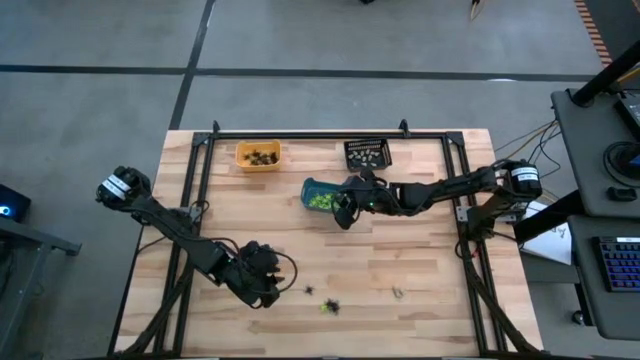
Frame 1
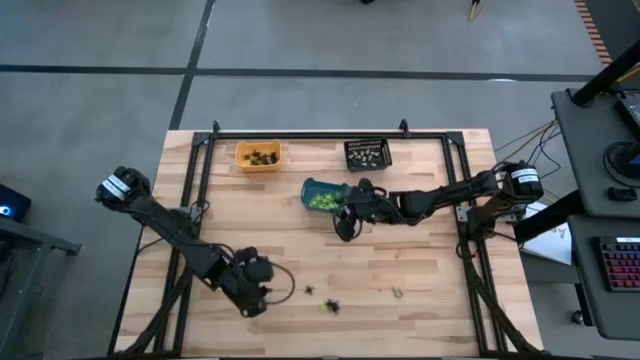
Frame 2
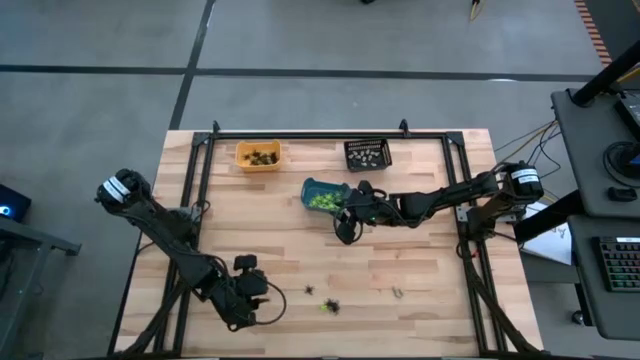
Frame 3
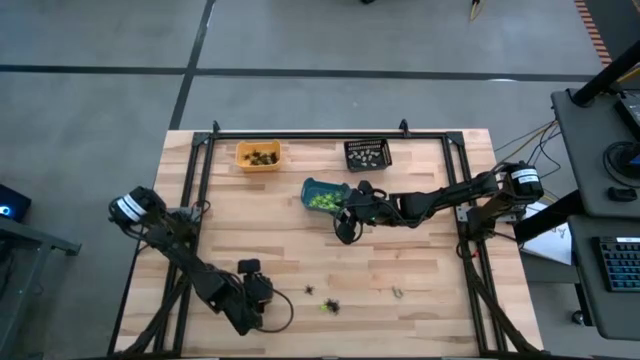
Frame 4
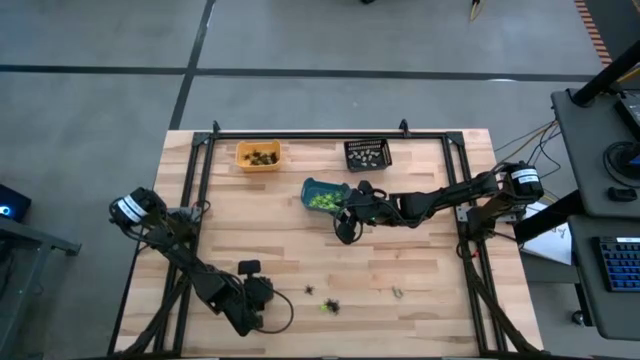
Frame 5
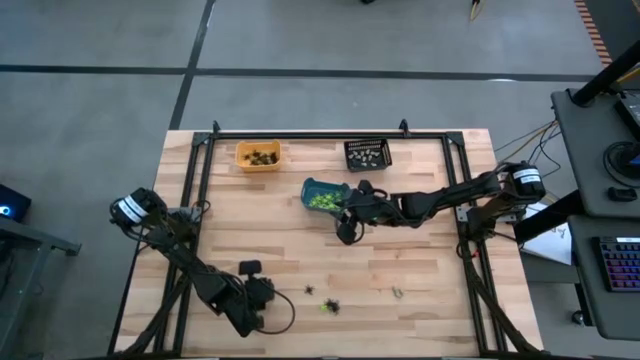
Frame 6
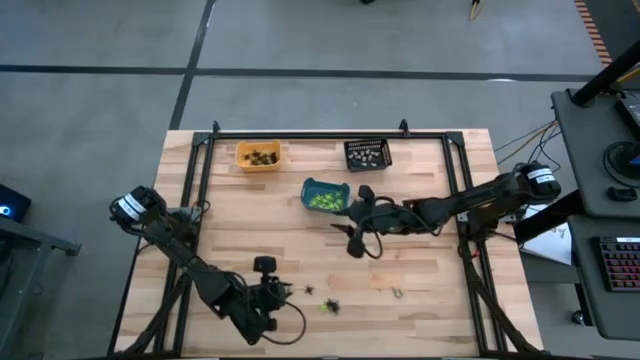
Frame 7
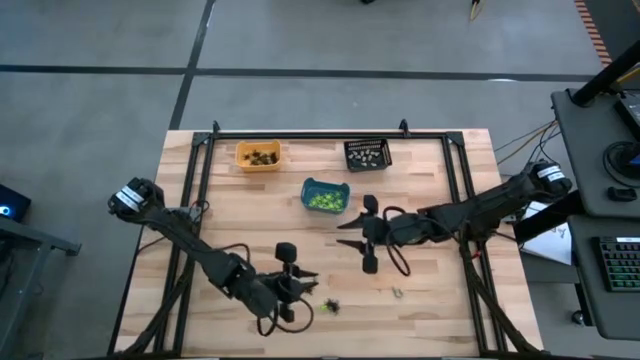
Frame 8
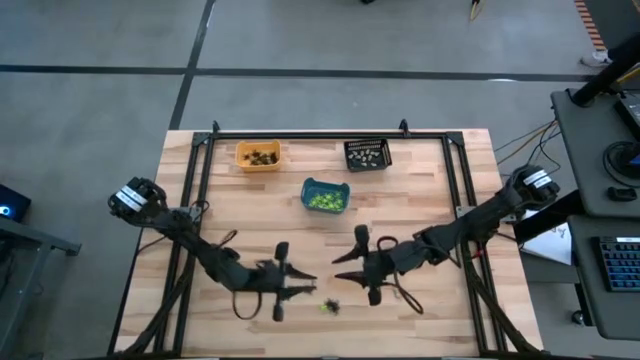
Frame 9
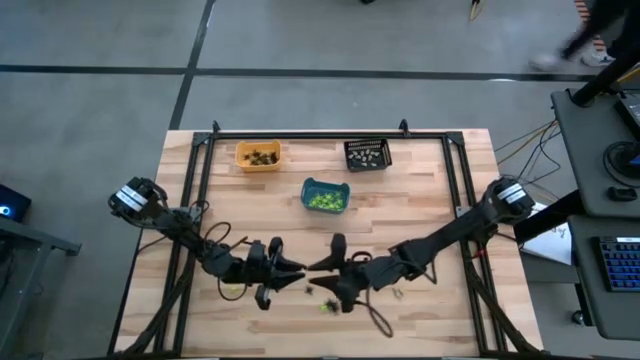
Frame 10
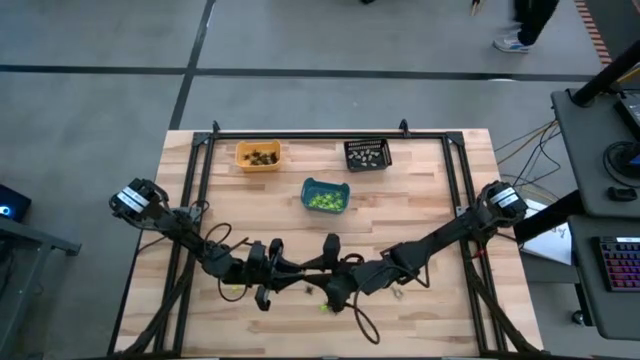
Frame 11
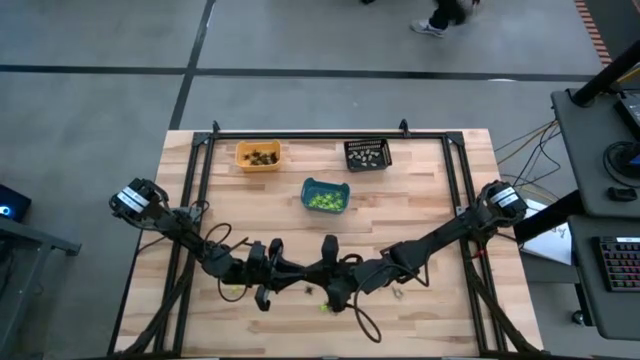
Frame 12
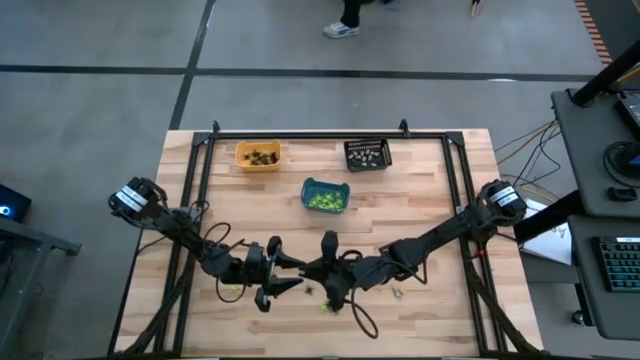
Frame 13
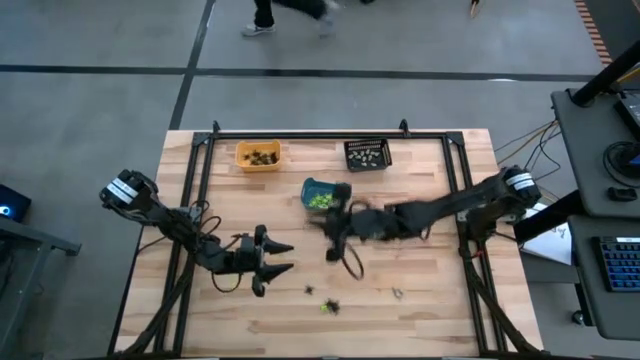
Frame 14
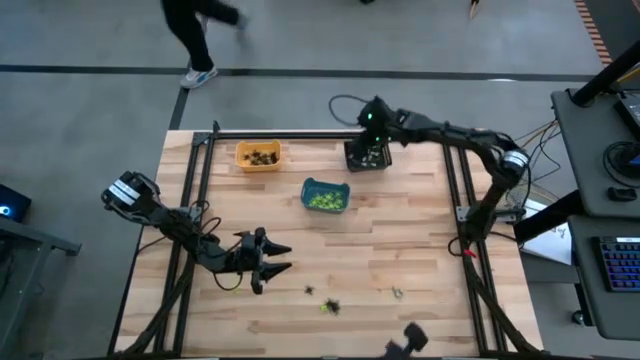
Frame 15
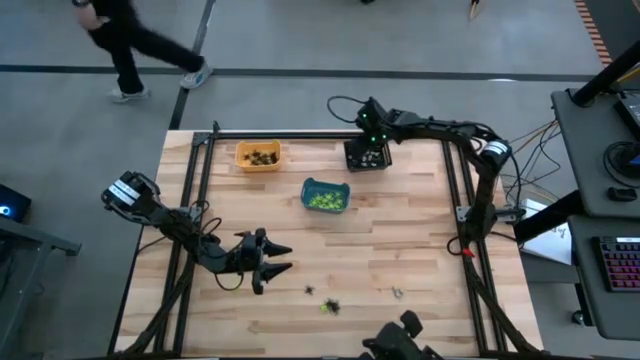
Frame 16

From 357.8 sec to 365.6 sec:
Task: Sort Halloween decoration
Put the white skull toy into the black bin

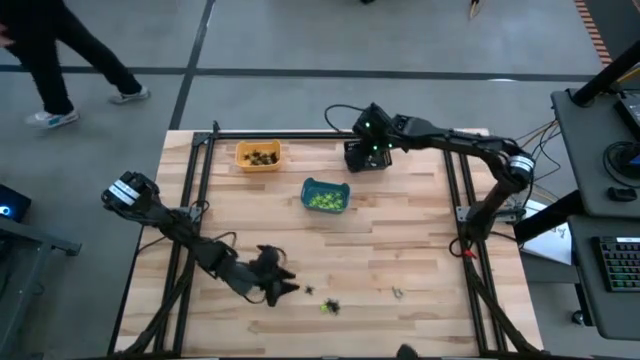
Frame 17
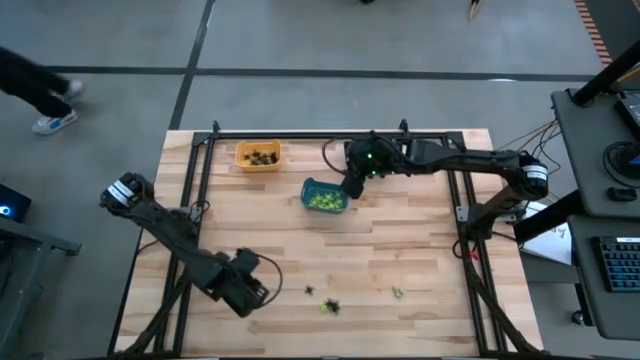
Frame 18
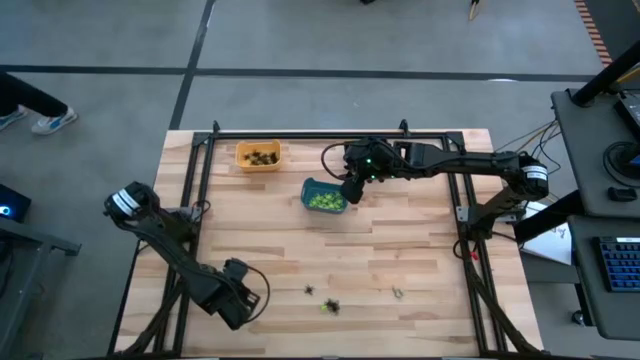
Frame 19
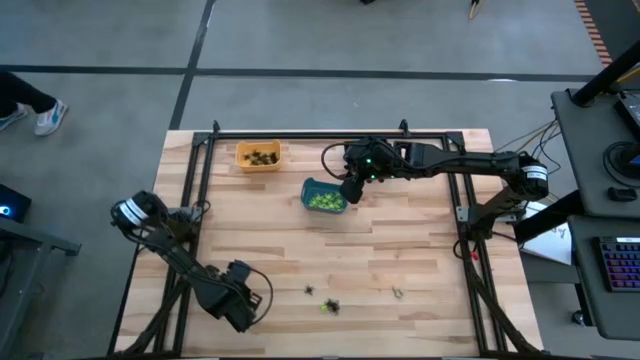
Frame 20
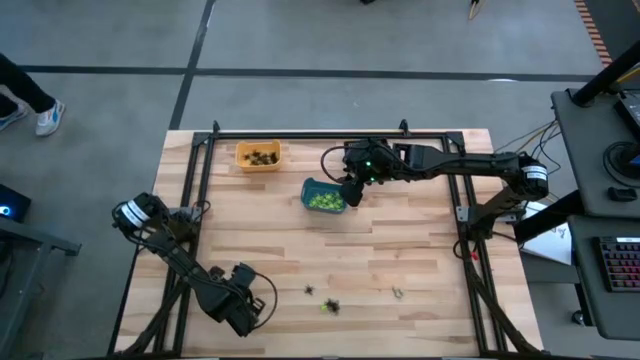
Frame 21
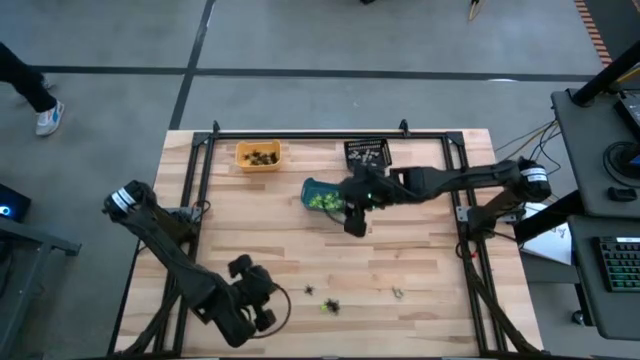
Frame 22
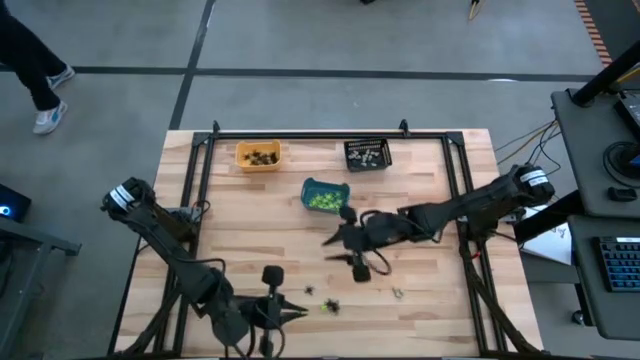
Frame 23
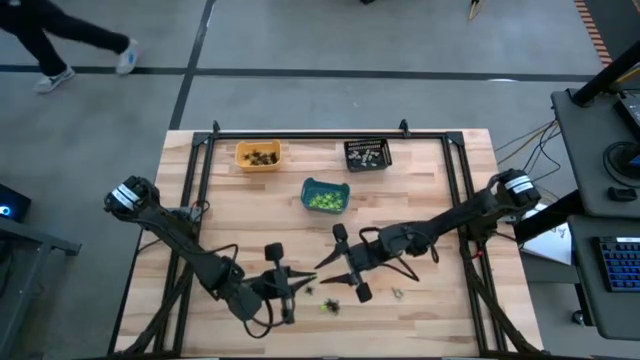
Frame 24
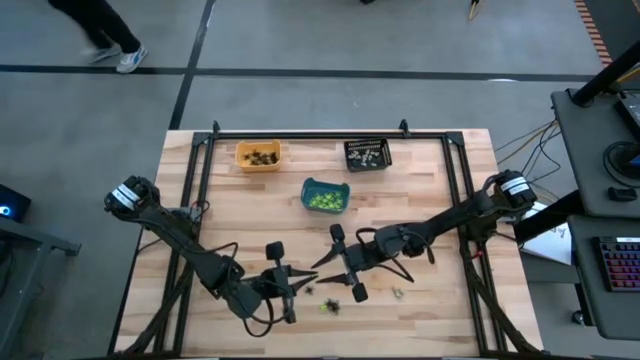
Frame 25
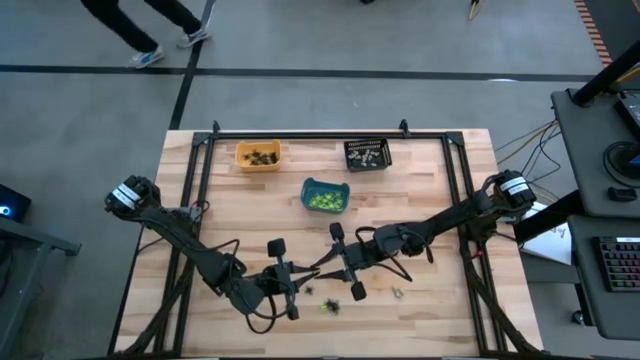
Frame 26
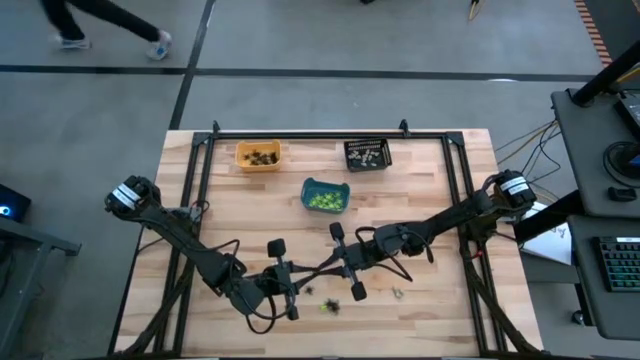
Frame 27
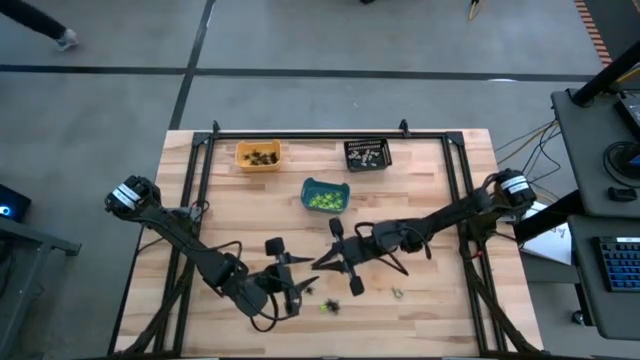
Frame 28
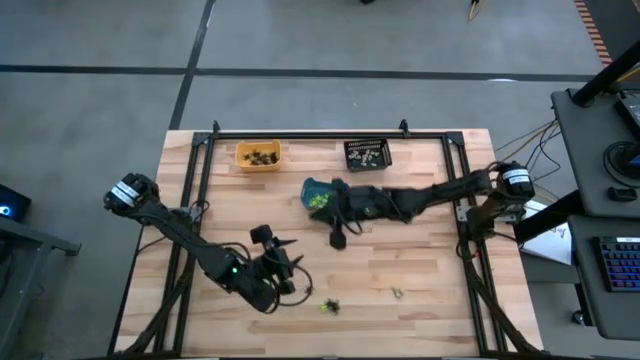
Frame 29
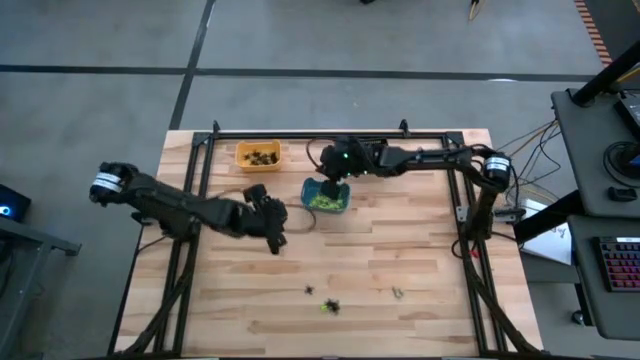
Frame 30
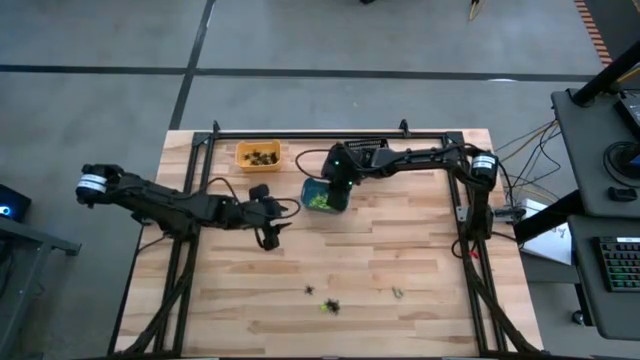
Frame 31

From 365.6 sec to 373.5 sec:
Put the green spider toy into the blue bin

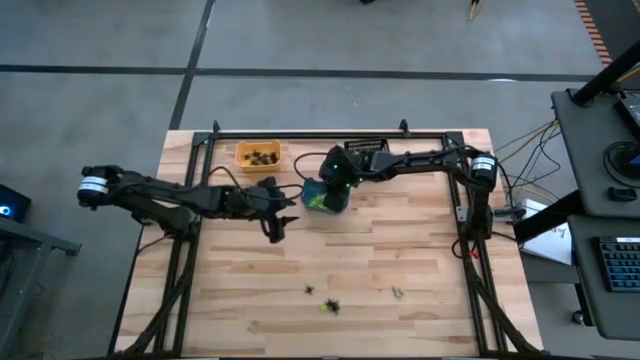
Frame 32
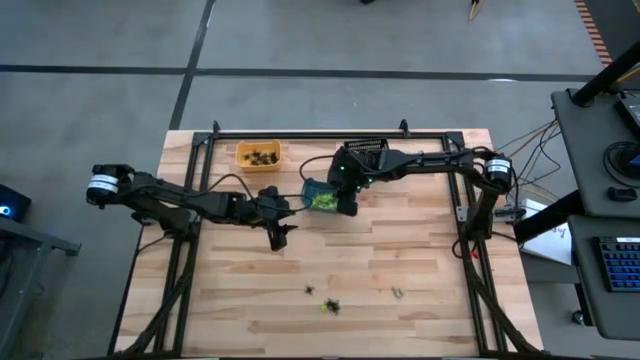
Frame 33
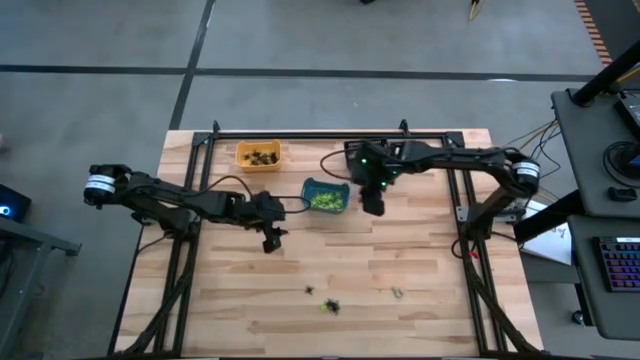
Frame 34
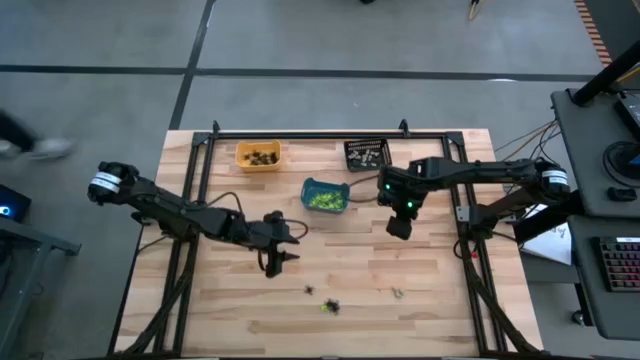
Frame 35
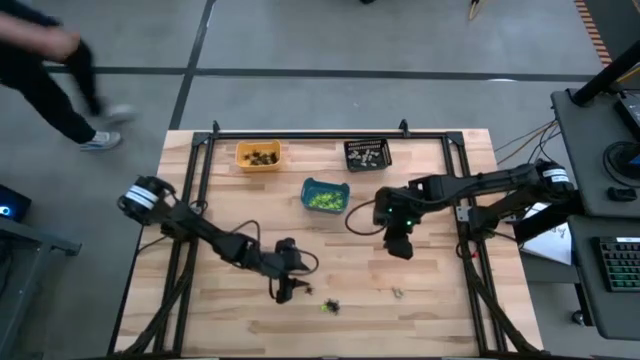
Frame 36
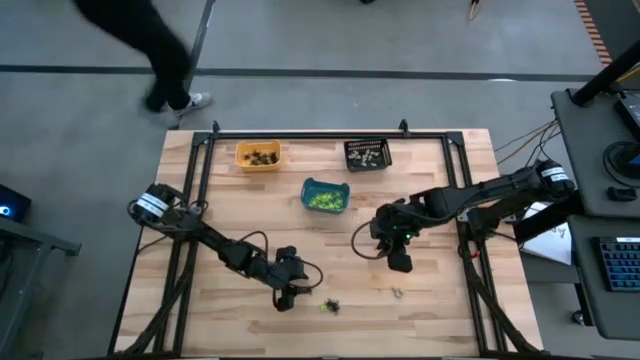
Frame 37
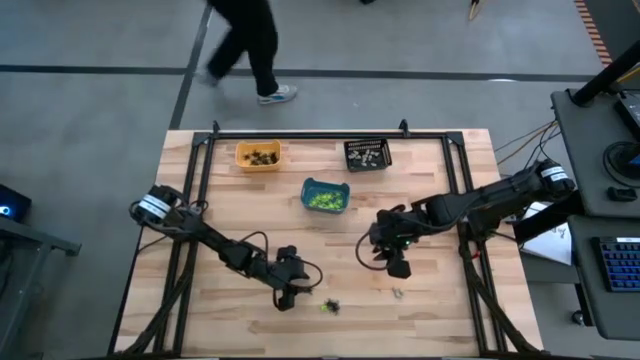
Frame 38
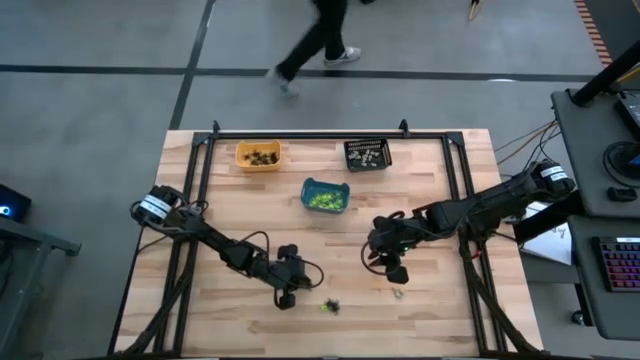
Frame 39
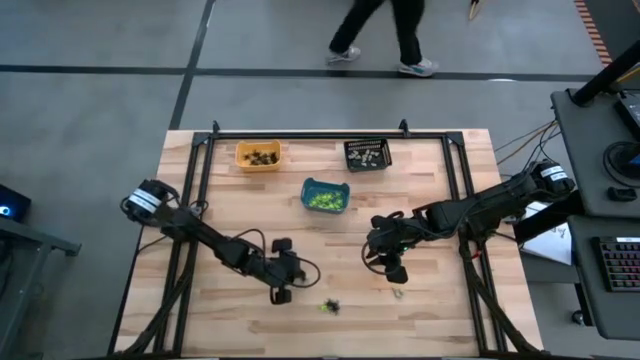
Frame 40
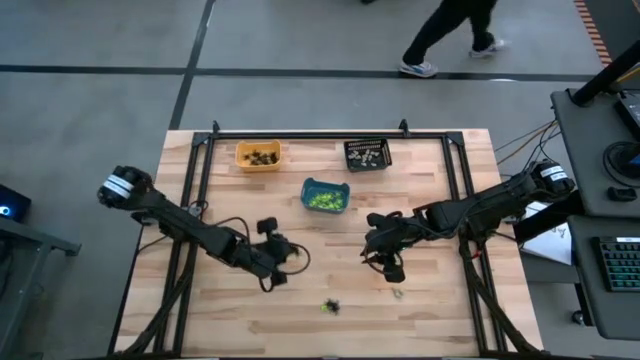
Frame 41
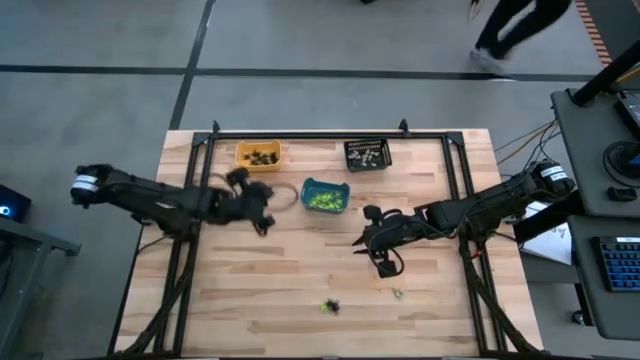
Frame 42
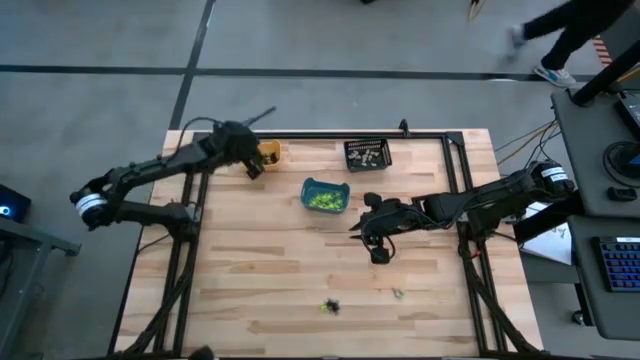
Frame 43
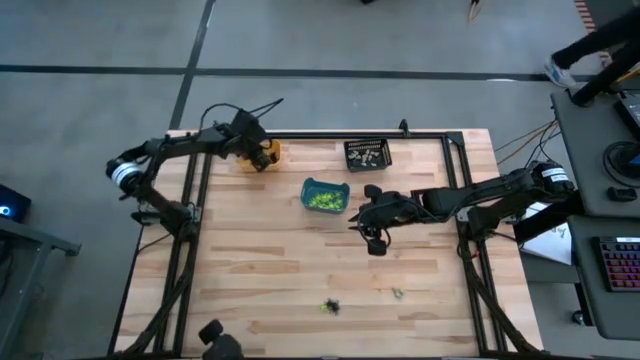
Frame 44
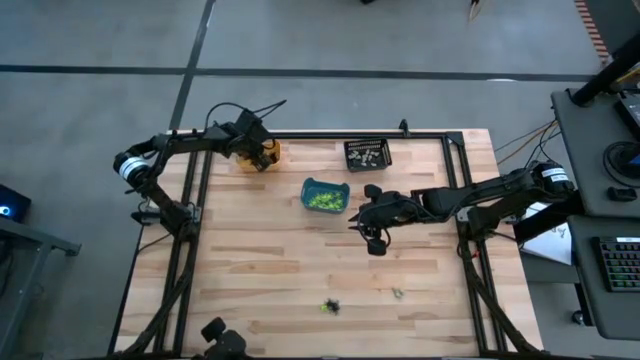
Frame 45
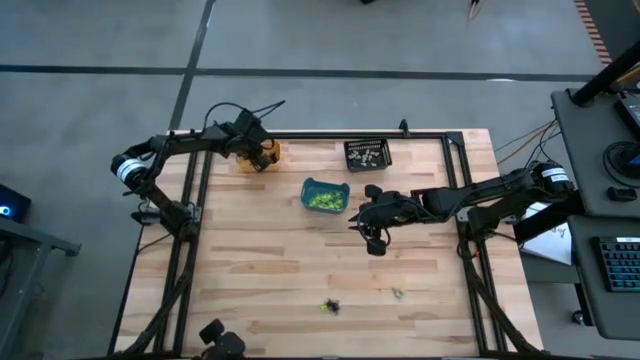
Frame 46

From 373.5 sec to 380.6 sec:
Put the black spider toy into the yellow bin
